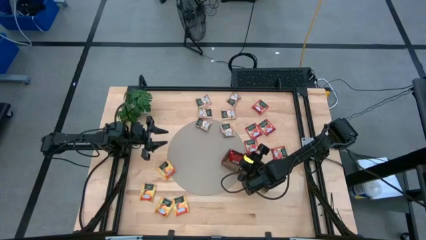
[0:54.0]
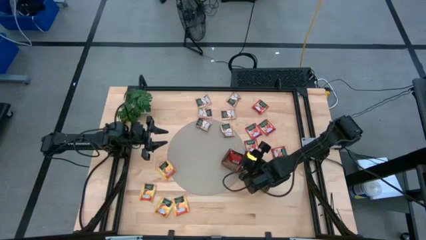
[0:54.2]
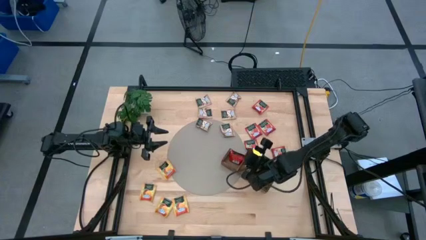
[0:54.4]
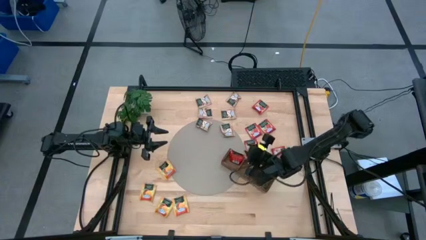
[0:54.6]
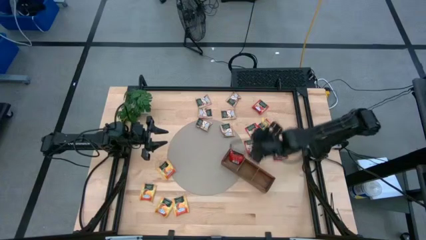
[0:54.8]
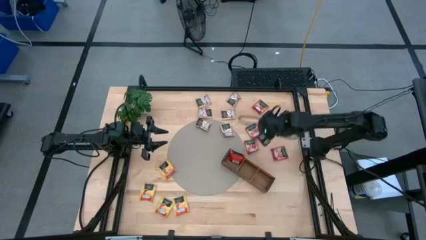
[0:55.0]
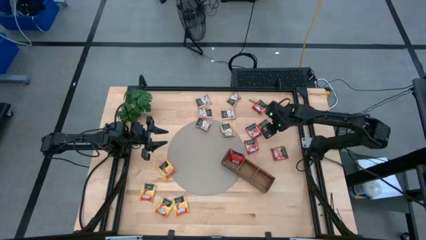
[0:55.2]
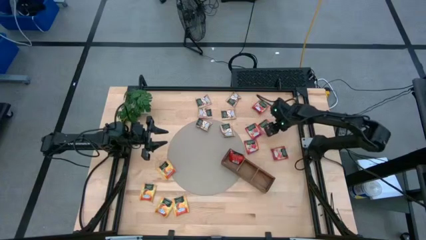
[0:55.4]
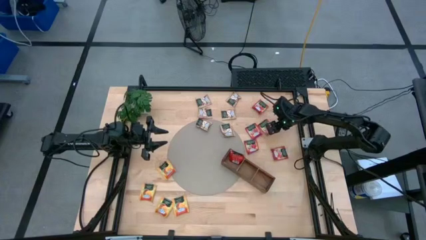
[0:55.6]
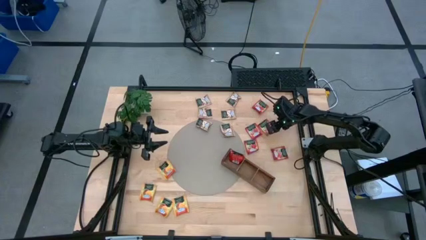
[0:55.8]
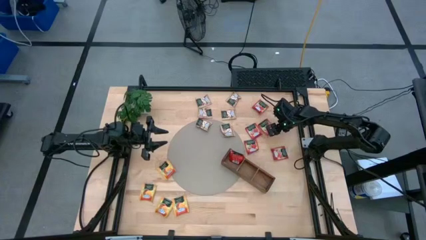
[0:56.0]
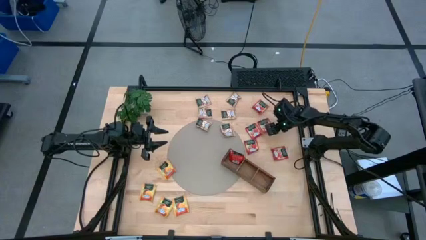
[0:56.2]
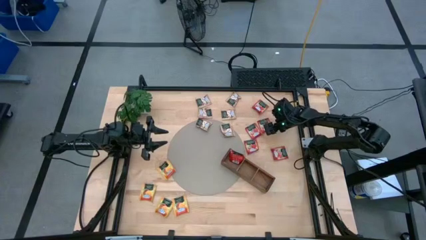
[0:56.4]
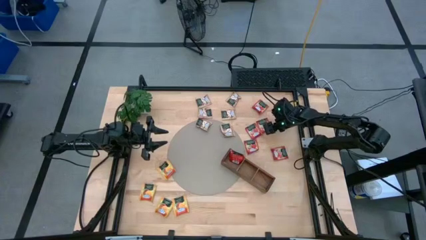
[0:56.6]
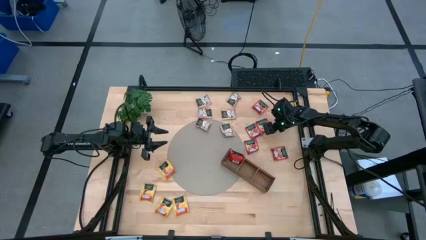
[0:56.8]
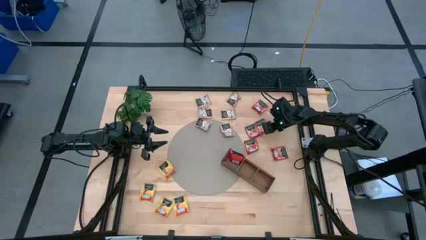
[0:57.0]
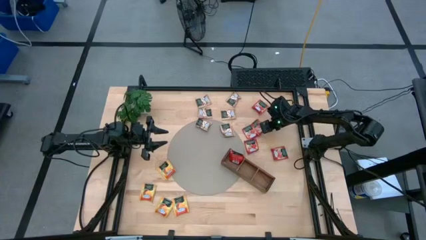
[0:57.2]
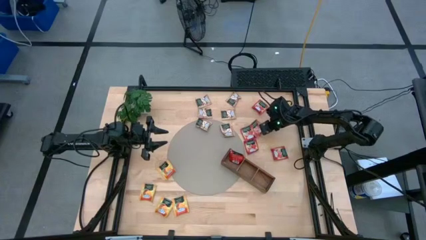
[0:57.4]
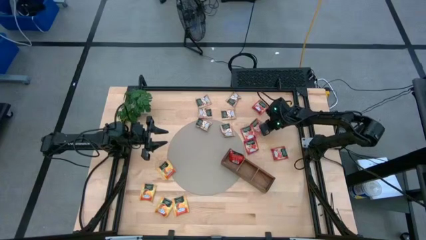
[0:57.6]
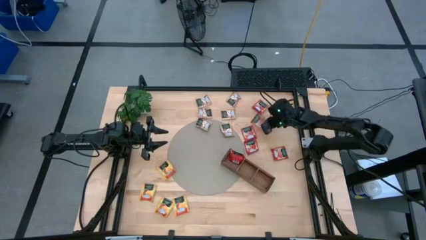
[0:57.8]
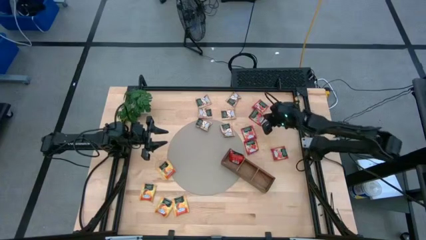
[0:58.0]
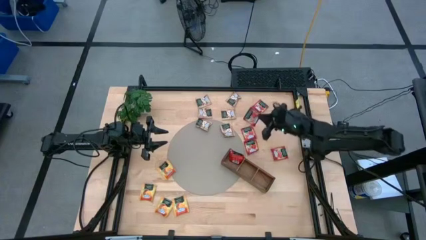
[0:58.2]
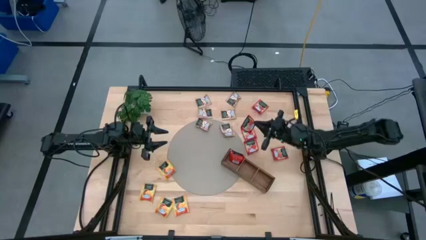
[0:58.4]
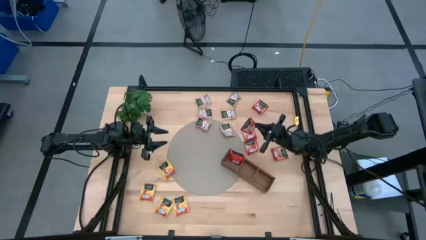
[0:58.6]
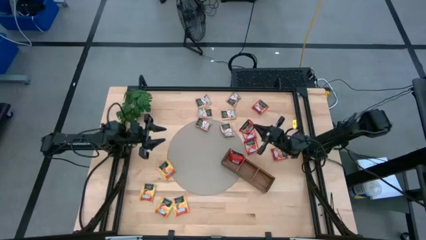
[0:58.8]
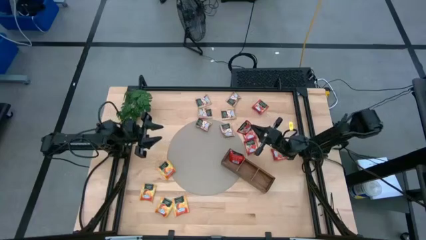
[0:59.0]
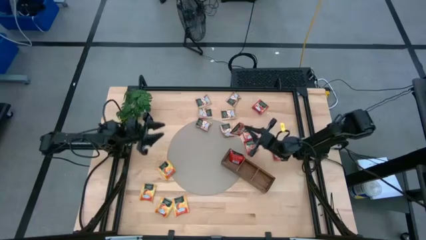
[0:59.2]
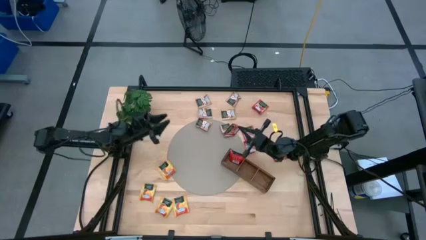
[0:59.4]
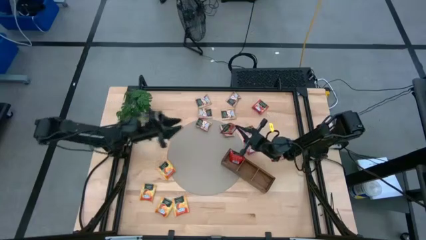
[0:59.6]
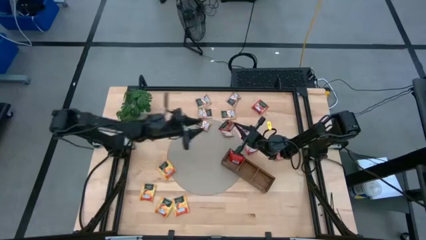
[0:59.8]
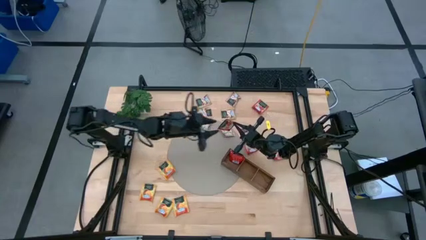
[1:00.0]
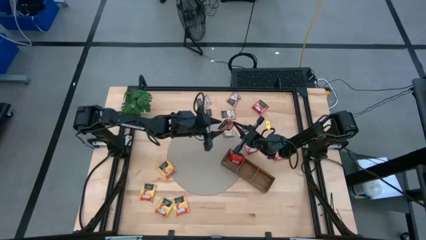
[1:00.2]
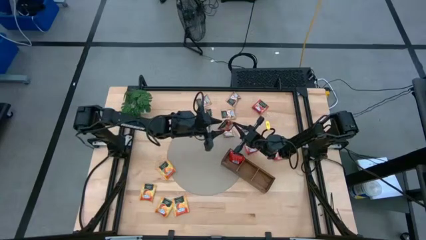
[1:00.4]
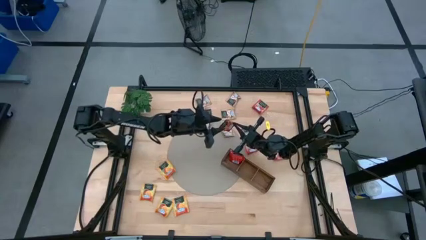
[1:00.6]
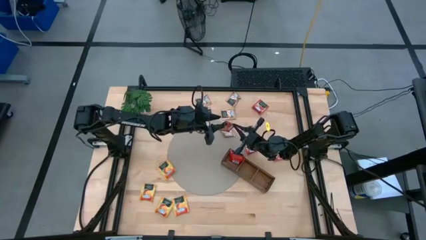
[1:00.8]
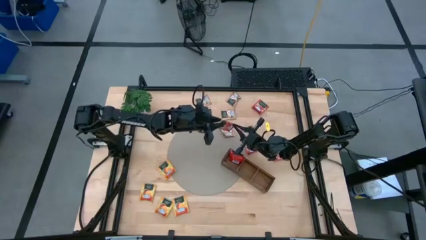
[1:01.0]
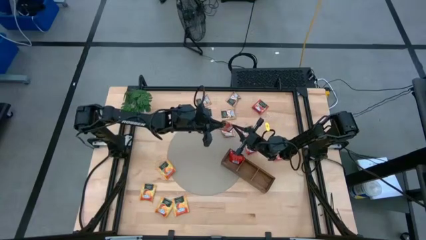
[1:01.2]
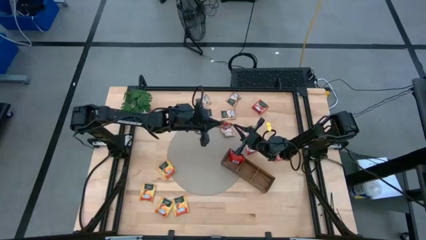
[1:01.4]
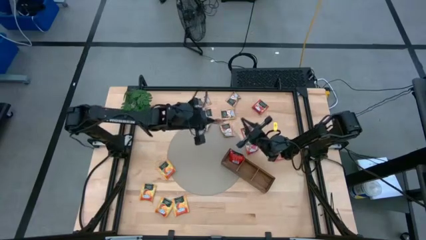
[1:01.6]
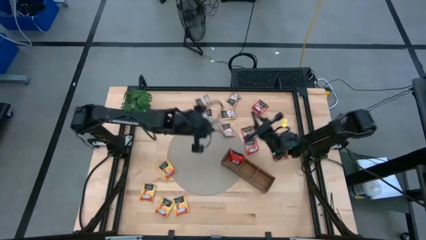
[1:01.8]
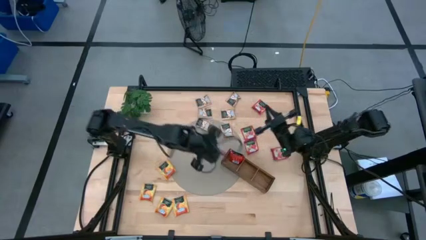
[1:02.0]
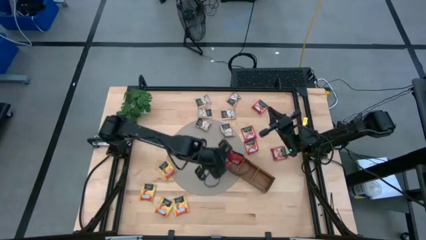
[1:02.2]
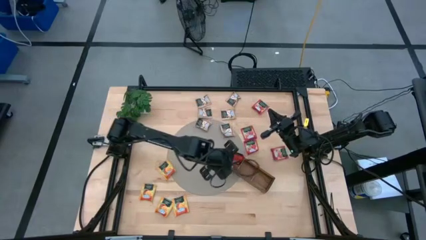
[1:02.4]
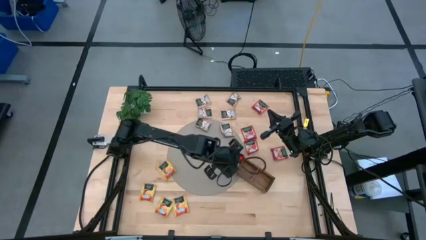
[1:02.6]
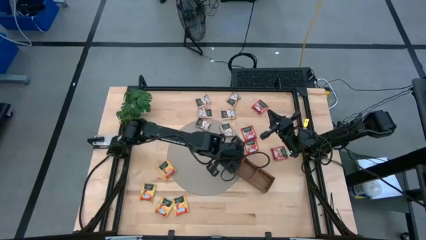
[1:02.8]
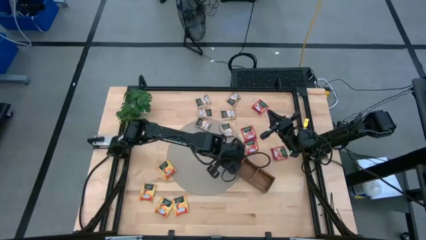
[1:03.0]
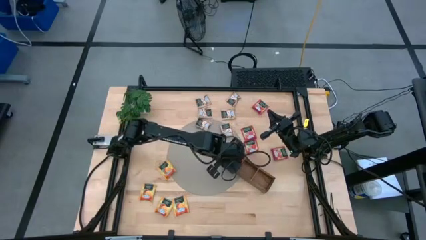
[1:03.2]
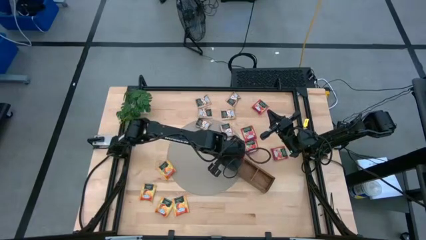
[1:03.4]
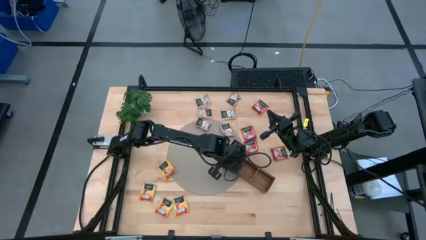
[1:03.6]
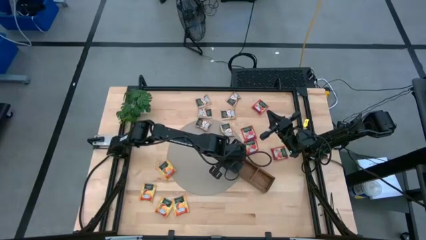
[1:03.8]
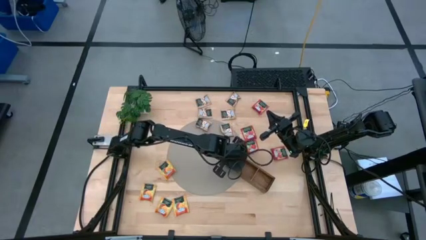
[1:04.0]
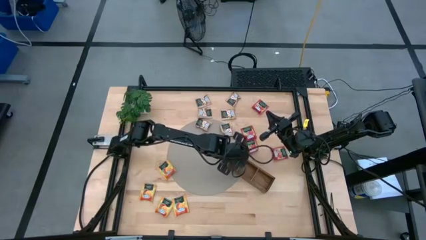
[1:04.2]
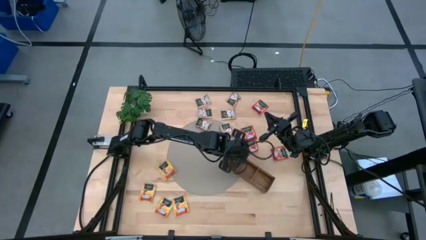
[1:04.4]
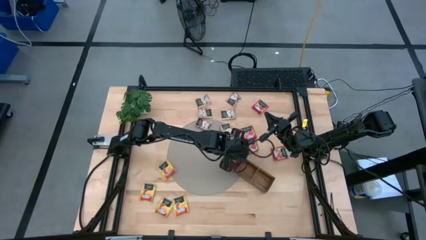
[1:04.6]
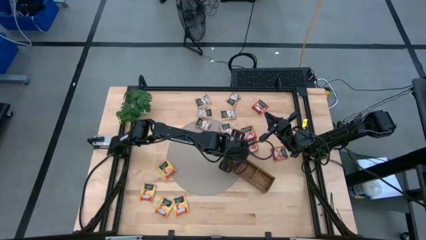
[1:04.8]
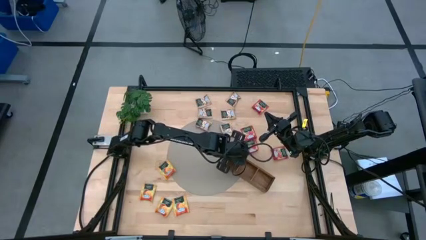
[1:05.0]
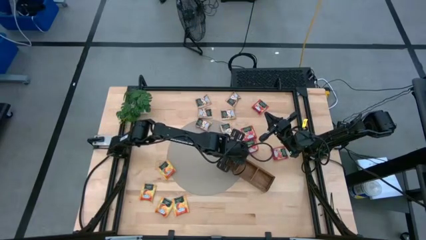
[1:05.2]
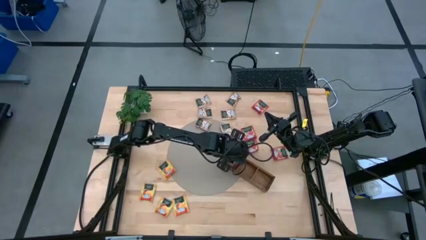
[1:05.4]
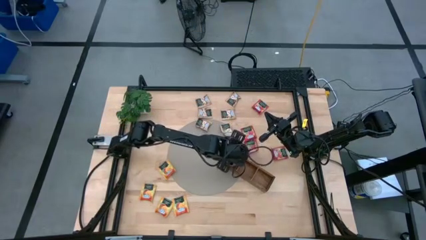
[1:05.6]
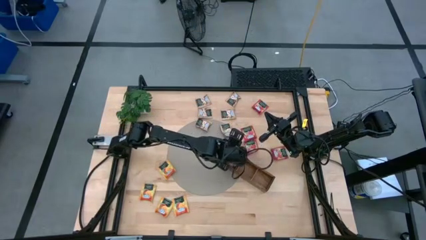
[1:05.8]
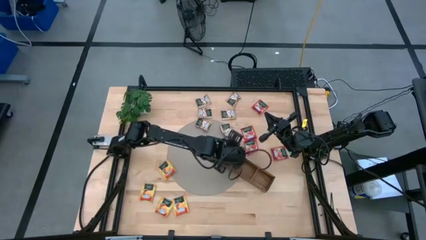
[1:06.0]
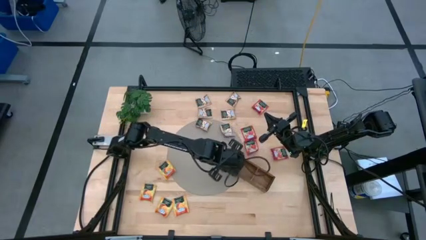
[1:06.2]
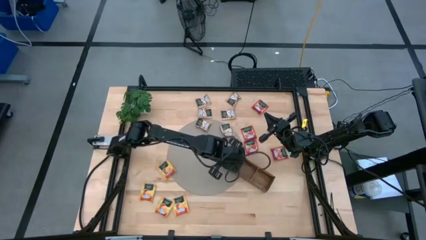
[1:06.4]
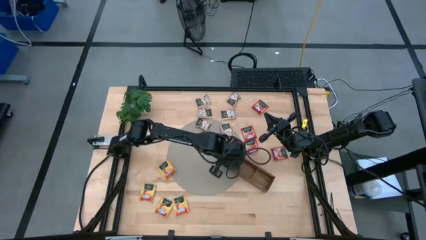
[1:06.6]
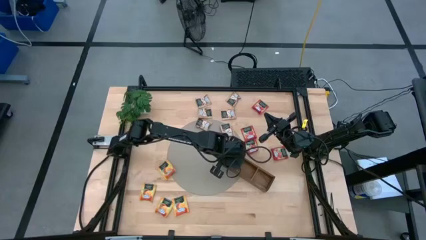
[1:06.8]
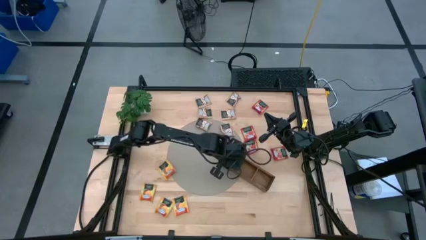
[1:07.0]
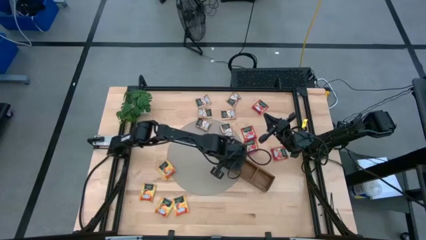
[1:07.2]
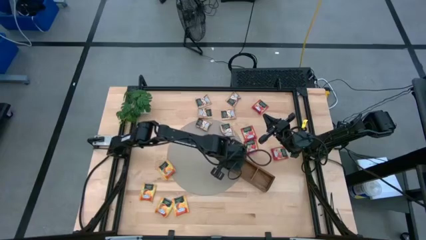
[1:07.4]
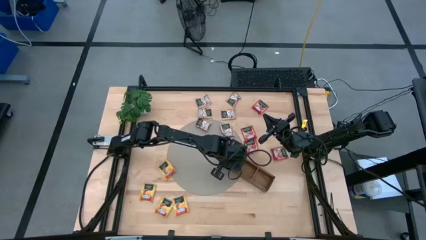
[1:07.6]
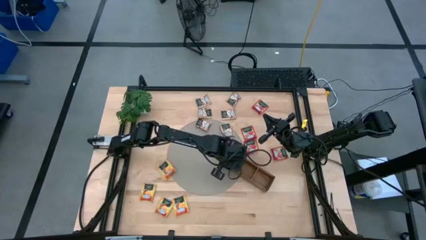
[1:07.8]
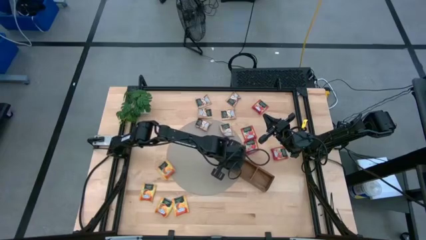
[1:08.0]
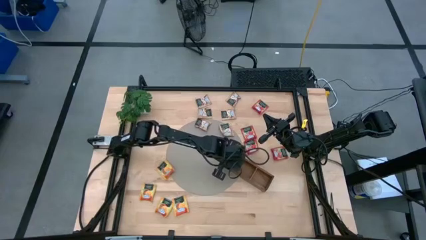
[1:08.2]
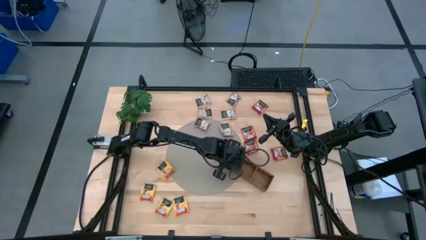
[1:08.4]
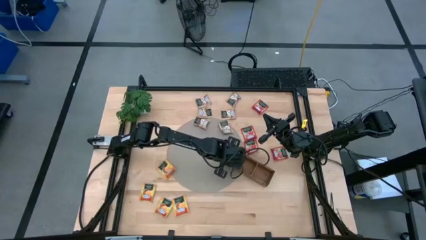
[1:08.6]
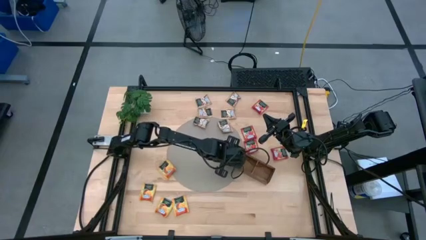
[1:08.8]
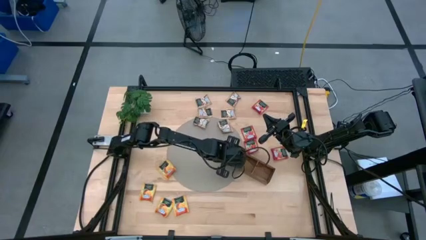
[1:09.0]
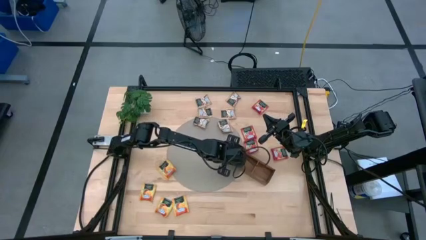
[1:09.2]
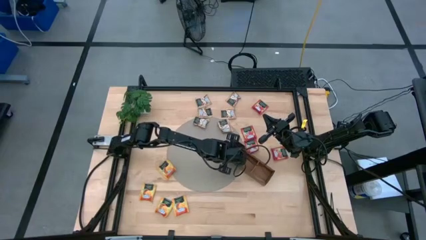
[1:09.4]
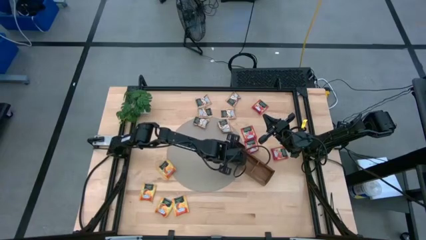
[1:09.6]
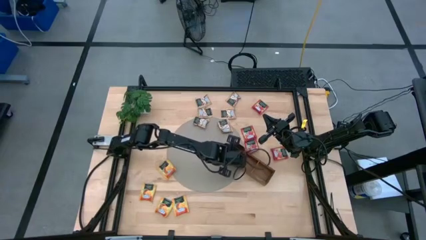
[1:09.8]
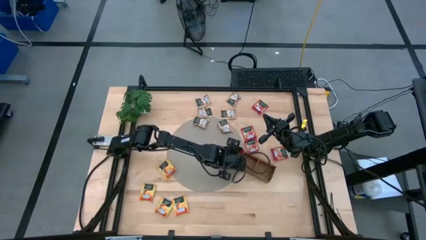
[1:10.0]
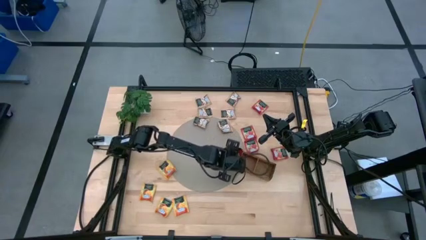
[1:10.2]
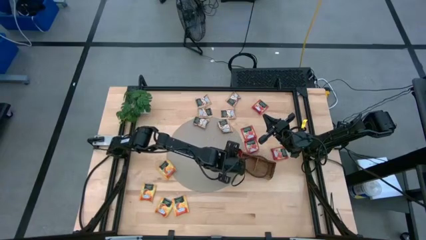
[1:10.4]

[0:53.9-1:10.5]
Task: Pick & Place Tea
Put the red tea bag into the left section of the wooden organizer
